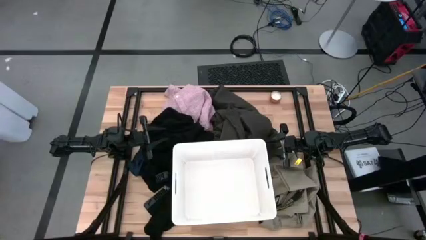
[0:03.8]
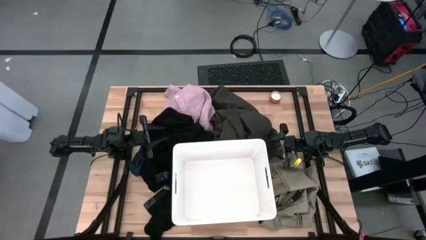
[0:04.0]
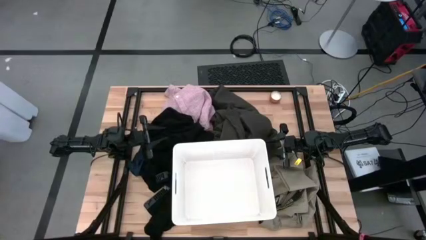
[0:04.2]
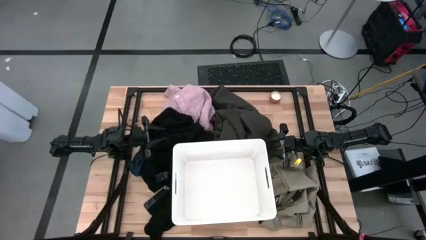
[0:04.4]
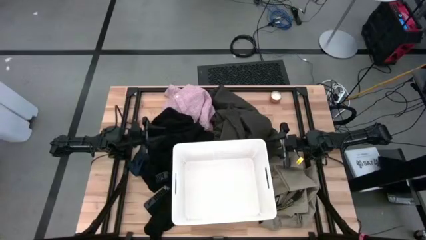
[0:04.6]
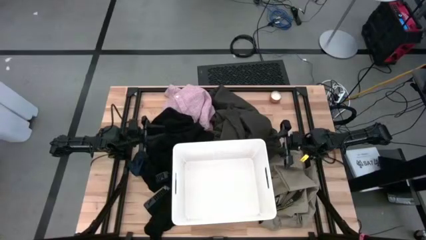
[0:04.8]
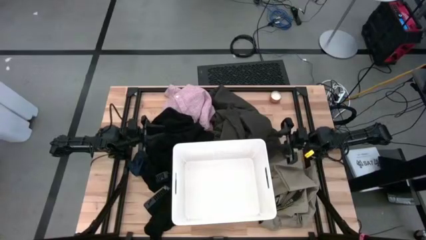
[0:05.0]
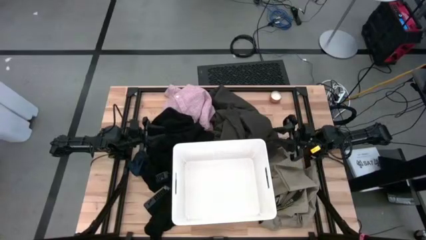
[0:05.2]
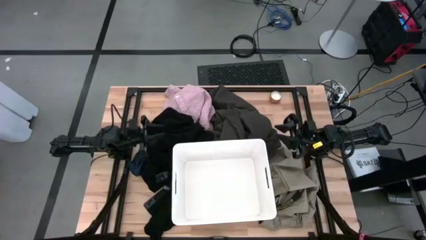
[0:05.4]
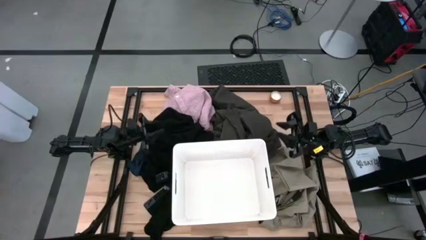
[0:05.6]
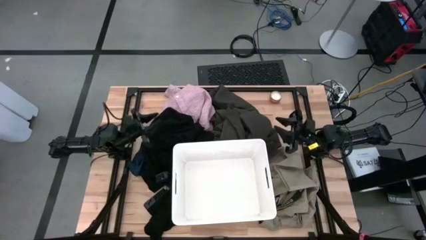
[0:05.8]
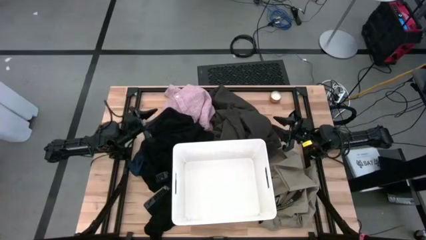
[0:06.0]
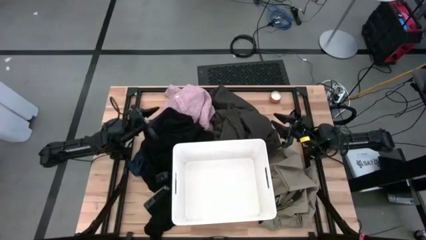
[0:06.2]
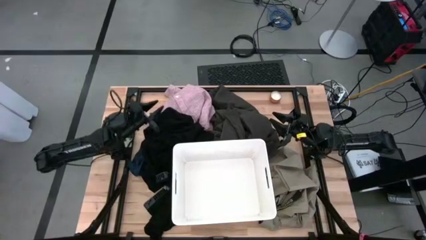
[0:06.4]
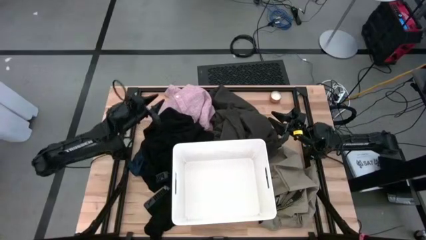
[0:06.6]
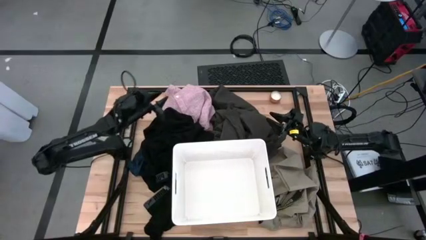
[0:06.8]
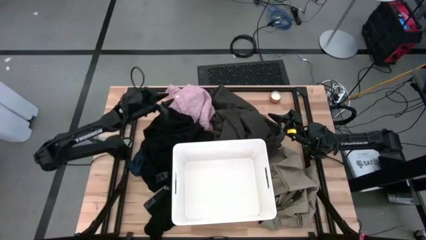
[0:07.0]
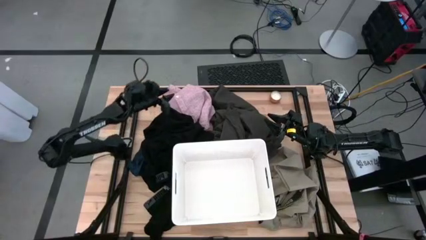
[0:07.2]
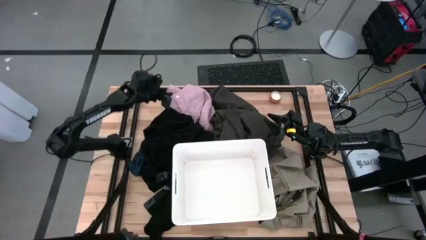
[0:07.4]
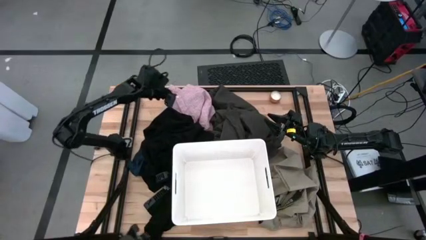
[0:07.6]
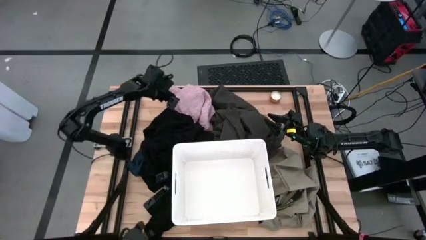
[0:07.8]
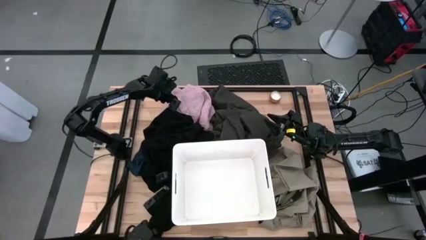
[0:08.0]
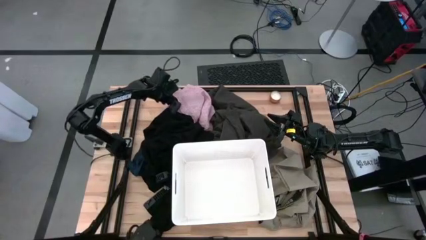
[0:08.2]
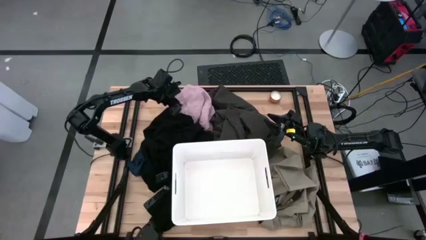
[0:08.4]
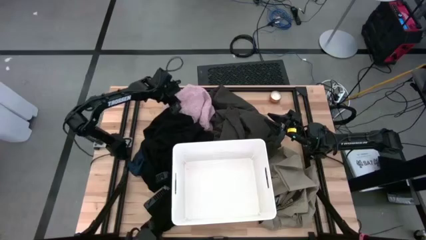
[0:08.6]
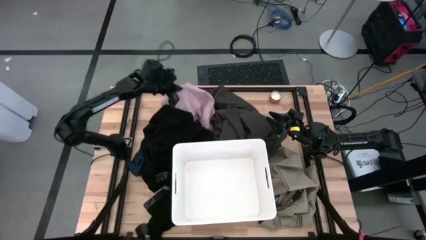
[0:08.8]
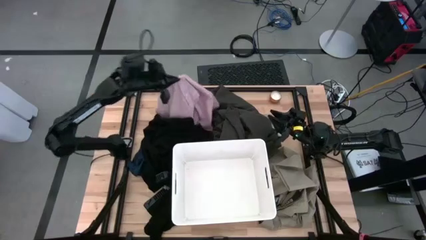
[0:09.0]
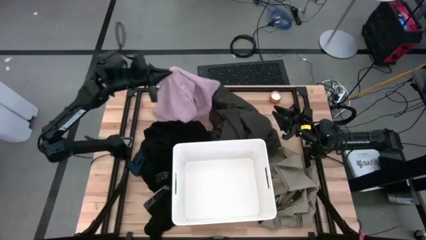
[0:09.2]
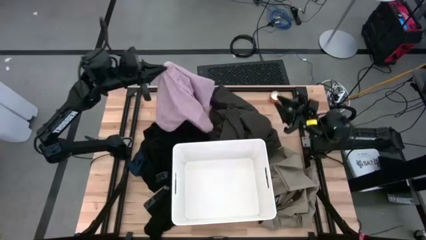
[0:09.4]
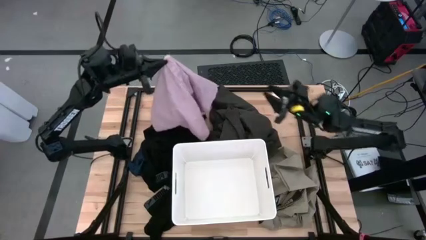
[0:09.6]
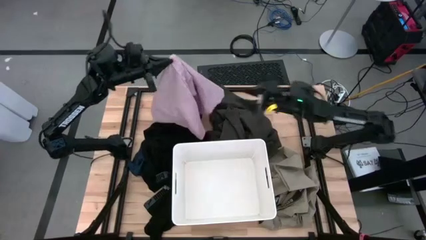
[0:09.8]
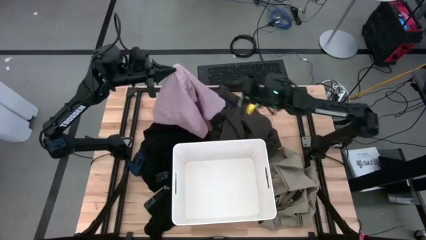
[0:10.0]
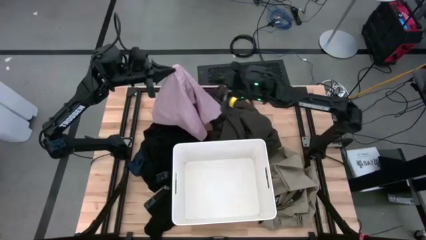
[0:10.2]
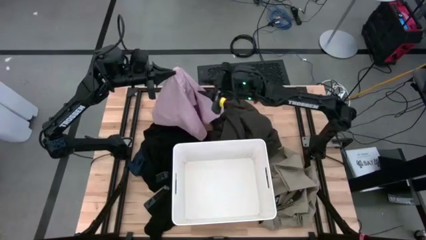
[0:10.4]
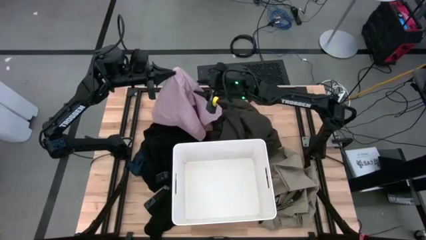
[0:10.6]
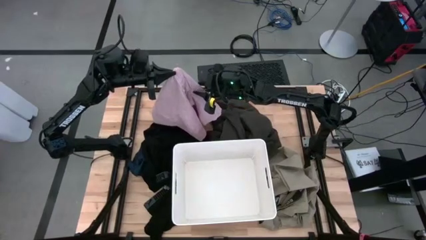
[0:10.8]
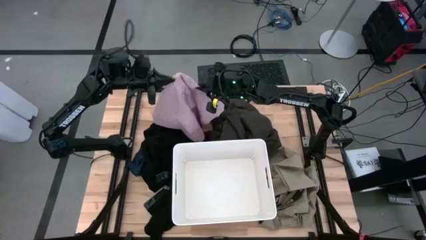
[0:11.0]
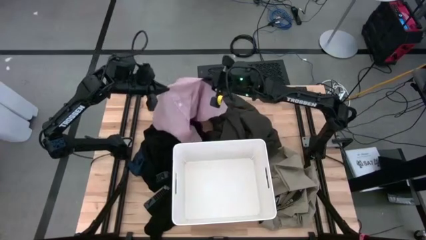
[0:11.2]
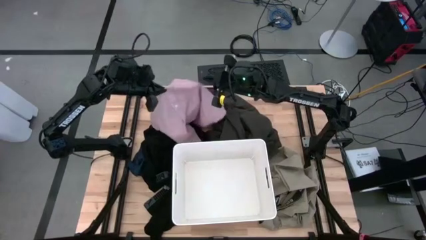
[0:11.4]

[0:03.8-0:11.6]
Task: Sort clothes
Put the pink polo shirt into the white bin

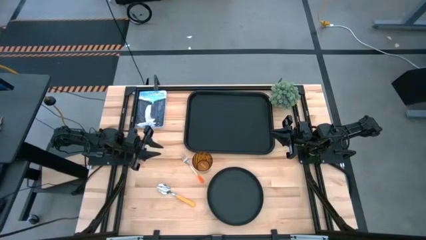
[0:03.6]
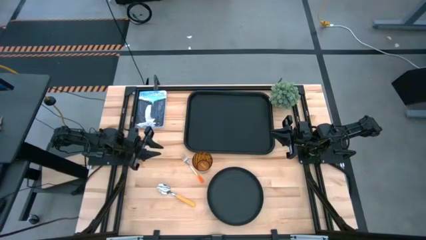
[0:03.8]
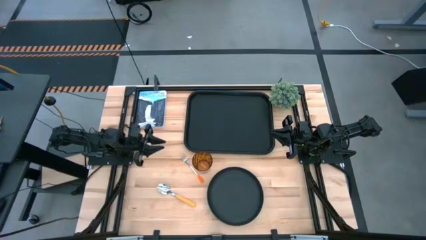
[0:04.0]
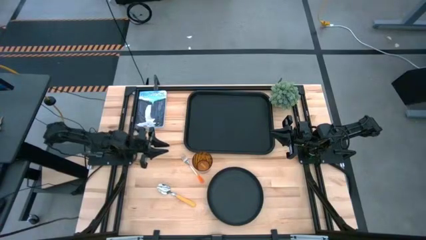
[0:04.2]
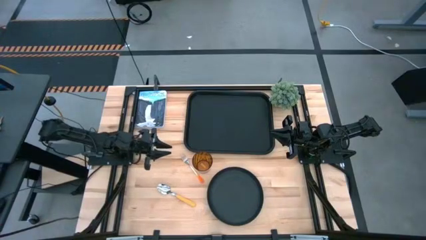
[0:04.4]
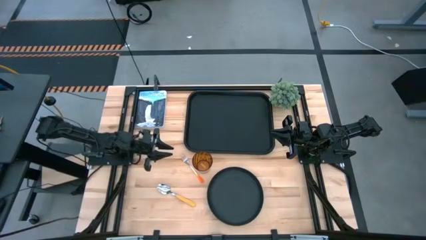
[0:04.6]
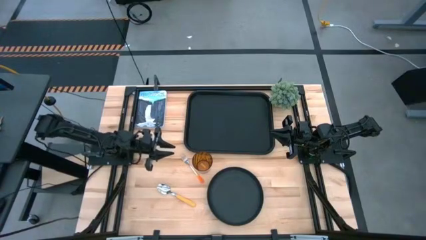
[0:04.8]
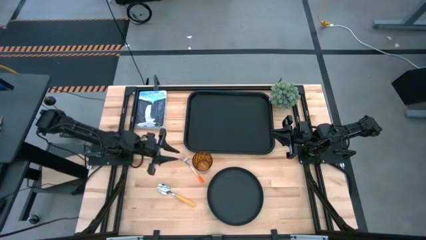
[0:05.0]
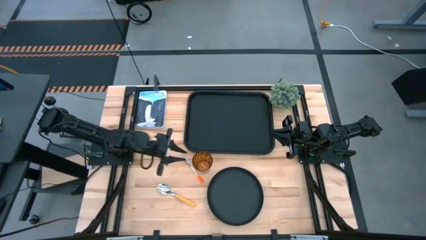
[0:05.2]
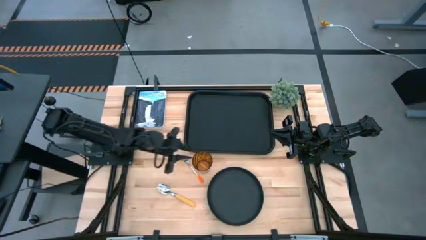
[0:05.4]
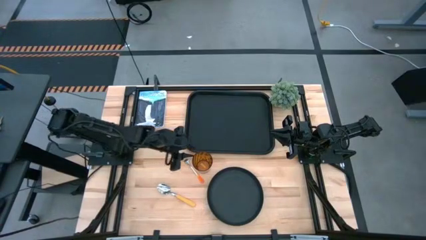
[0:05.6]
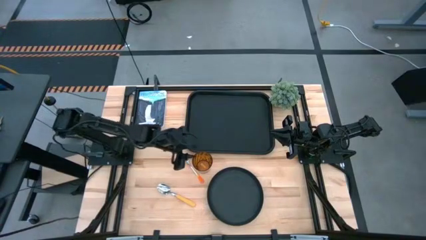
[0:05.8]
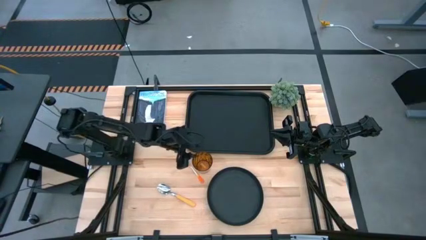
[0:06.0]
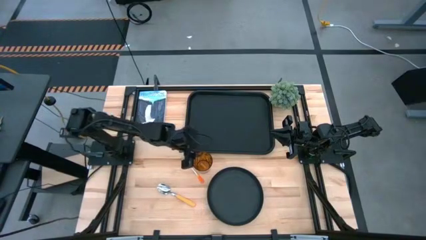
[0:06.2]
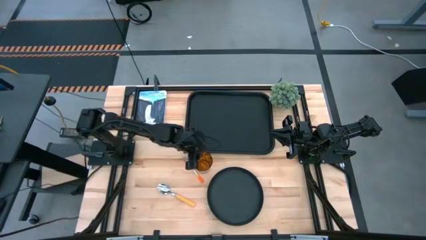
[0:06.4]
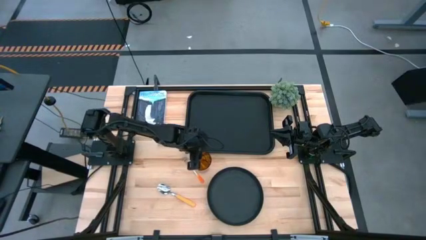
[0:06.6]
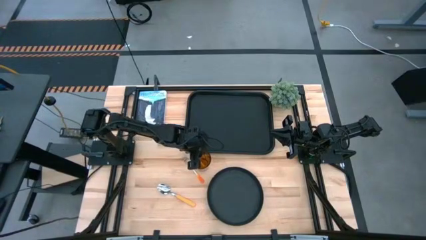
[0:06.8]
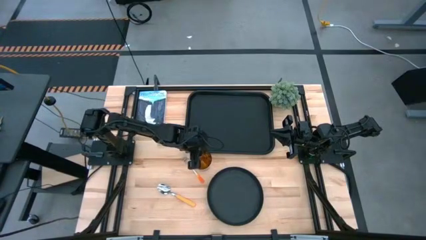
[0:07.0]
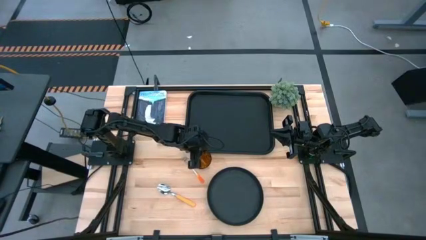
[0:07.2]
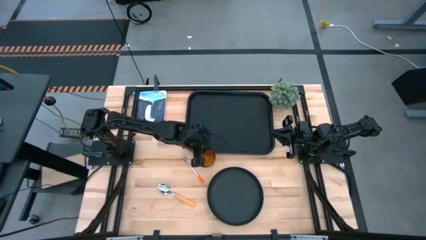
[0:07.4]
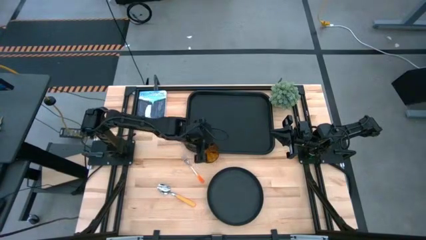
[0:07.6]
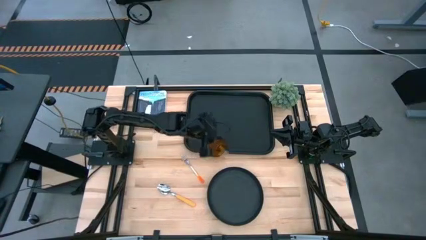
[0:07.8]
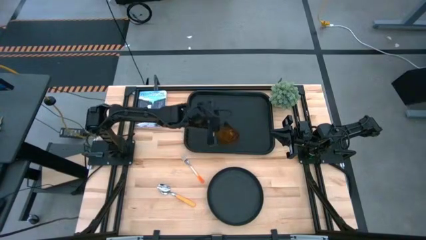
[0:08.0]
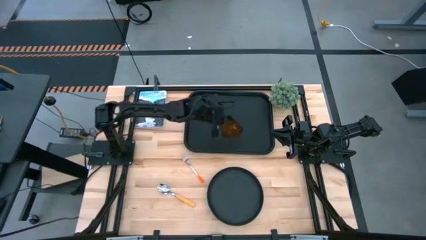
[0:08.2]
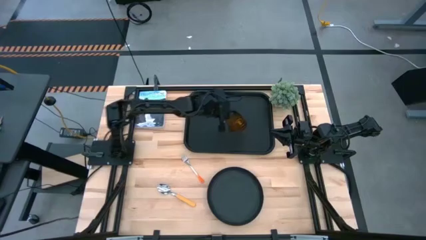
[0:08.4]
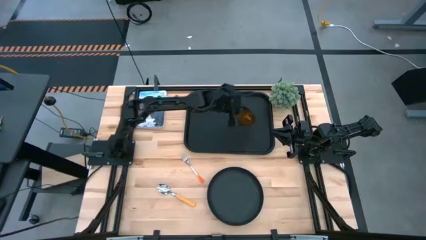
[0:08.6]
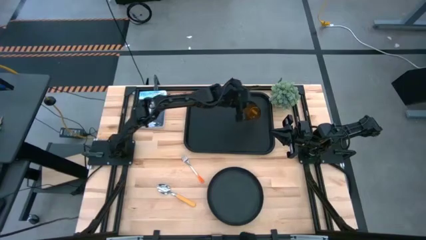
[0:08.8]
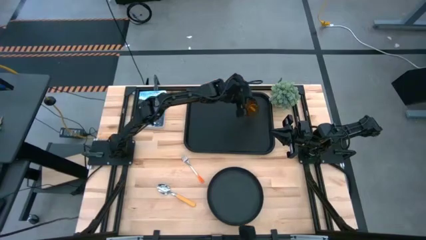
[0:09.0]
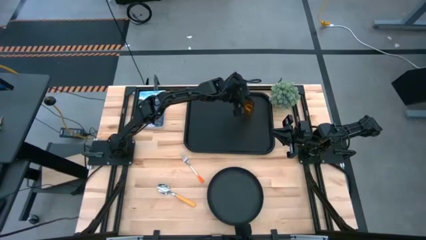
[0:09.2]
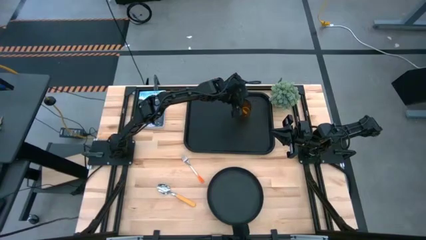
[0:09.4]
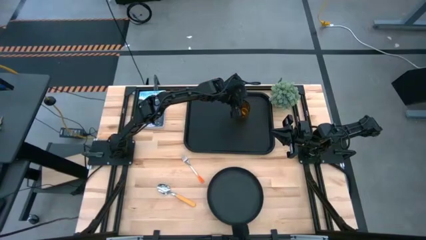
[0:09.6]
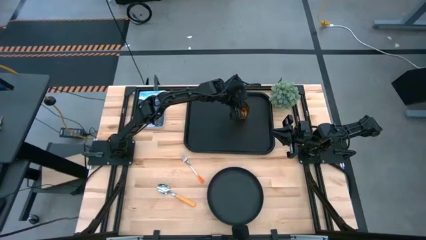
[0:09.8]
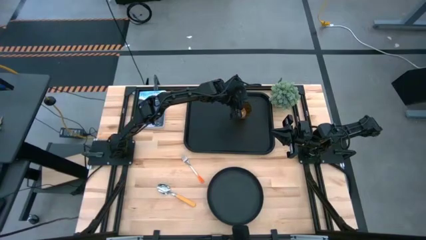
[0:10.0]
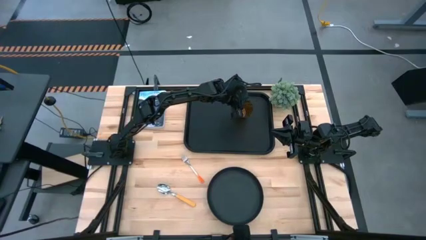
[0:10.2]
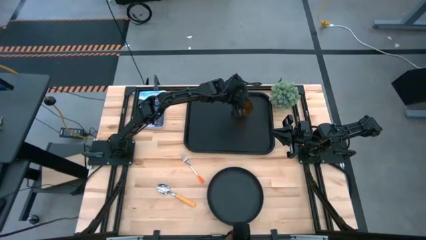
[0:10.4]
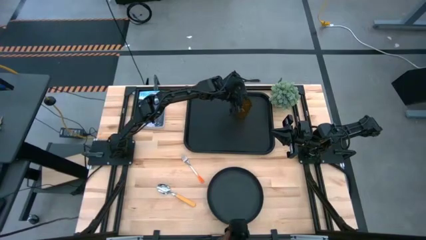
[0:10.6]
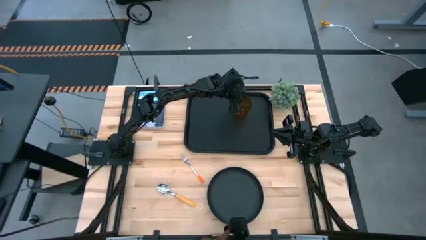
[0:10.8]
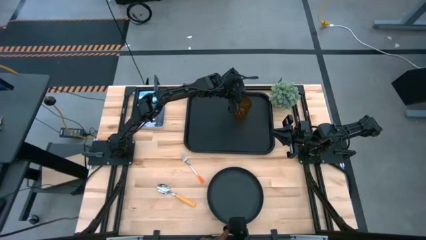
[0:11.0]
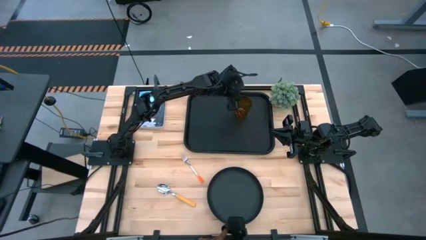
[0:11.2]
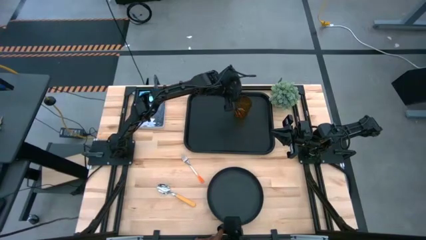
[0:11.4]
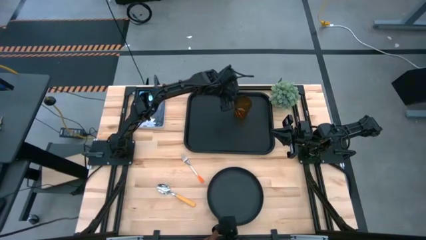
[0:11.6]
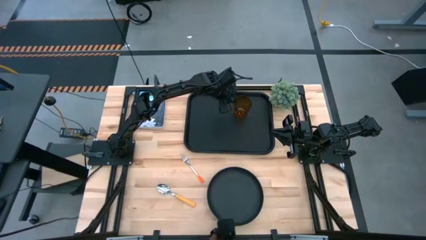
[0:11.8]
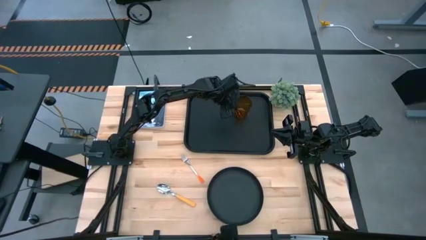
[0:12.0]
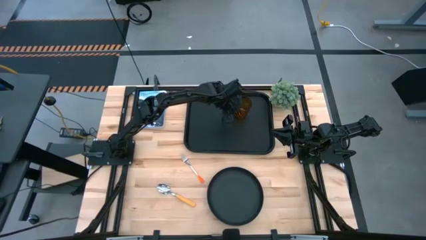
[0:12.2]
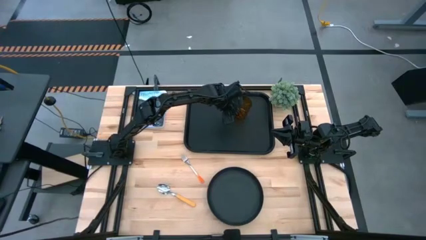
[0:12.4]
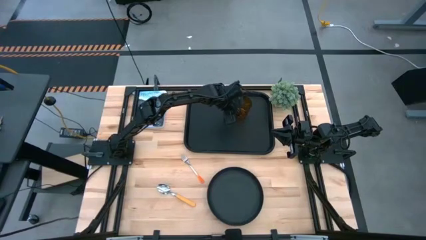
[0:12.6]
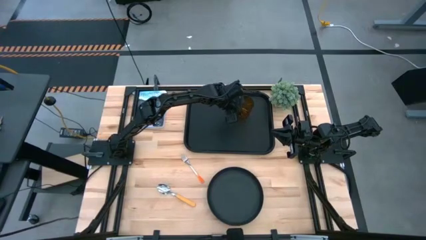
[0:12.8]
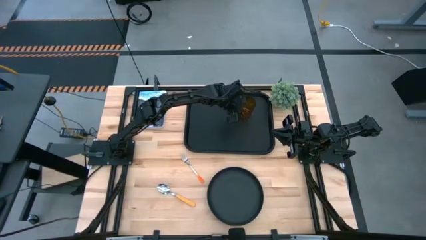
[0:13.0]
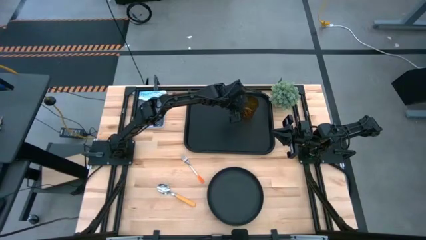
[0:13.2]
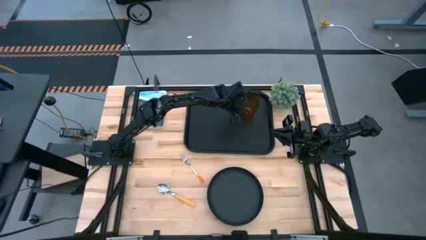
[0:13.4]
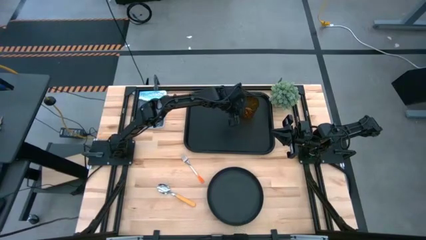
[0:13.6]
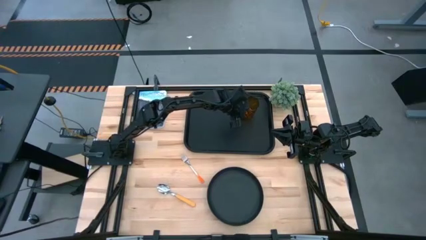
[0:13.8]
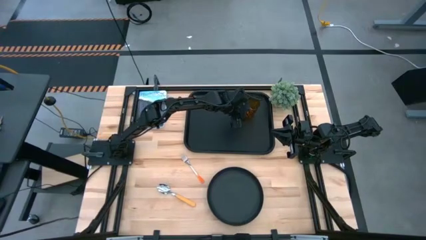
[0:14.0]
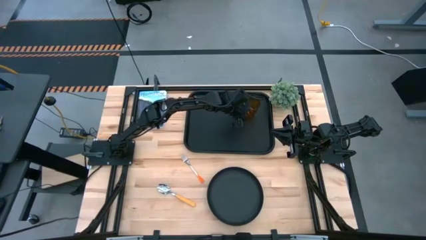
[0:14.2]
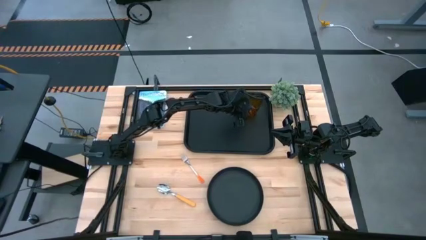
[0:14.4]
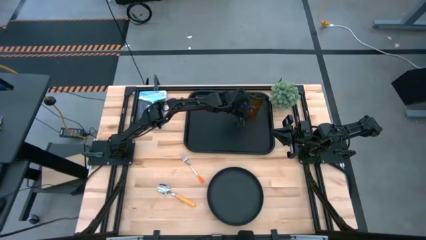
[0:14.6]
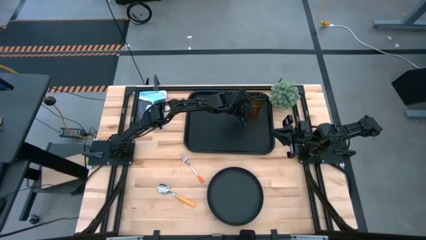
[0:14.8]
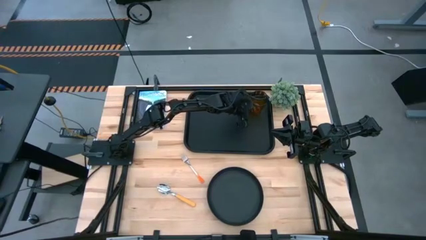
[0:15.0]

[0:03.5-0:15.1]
Task: Pick and place plate/cup/fork/spoon on tray
Put the orange glass on the black tray
